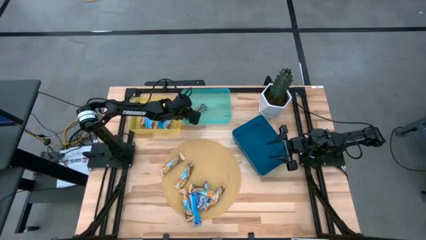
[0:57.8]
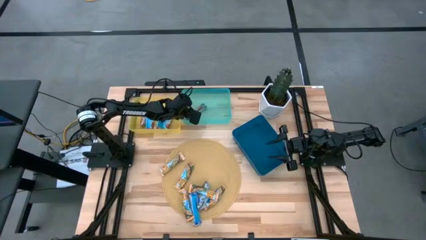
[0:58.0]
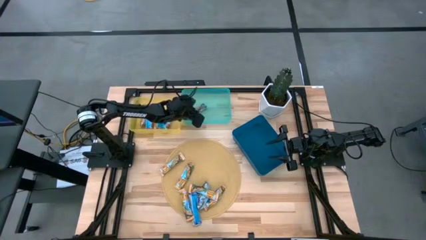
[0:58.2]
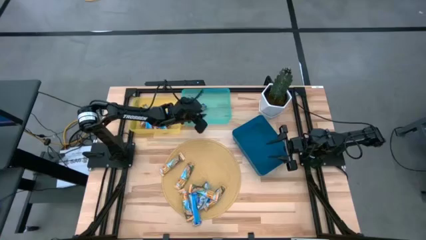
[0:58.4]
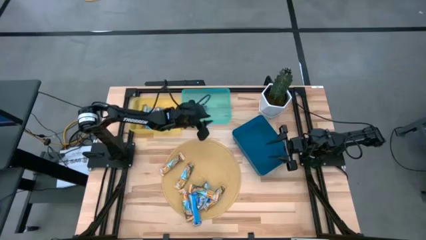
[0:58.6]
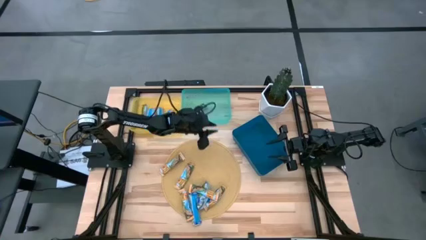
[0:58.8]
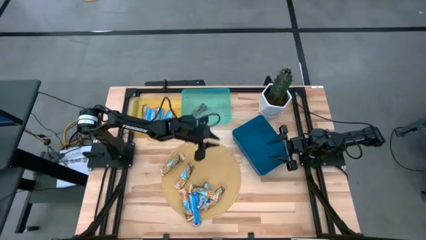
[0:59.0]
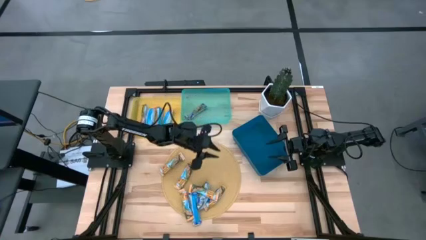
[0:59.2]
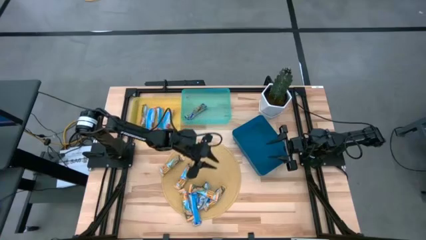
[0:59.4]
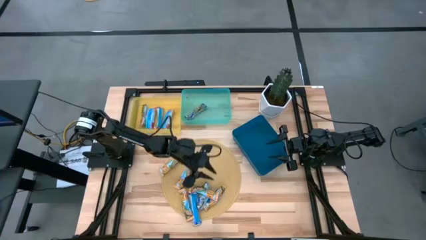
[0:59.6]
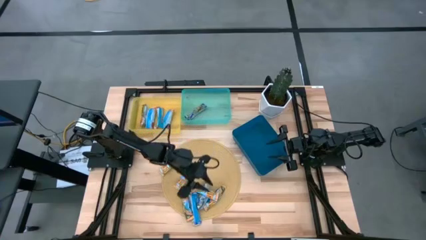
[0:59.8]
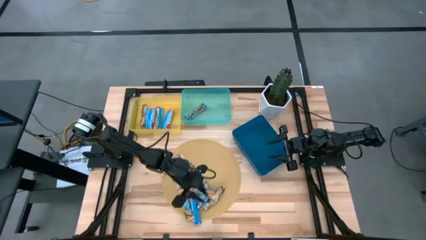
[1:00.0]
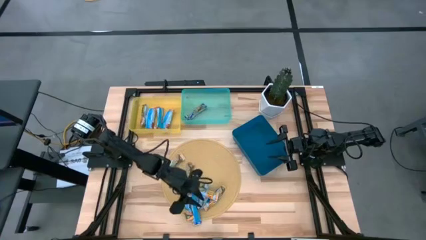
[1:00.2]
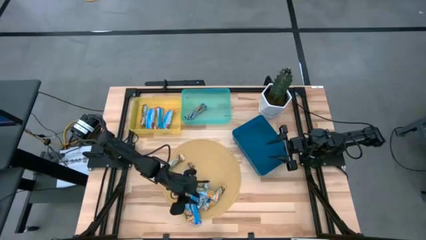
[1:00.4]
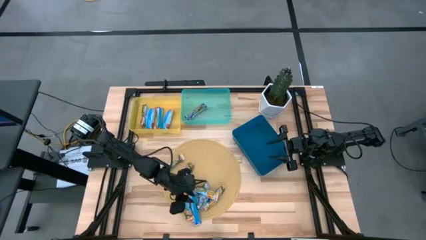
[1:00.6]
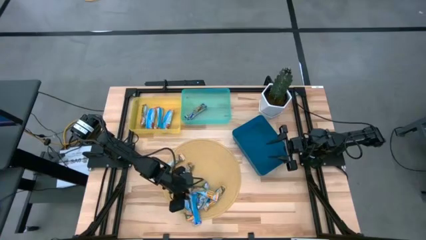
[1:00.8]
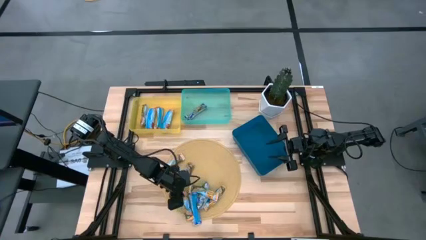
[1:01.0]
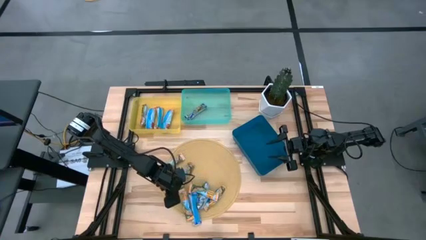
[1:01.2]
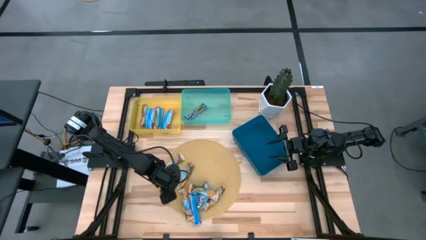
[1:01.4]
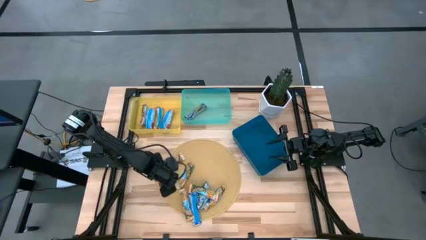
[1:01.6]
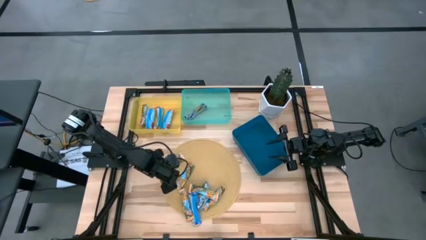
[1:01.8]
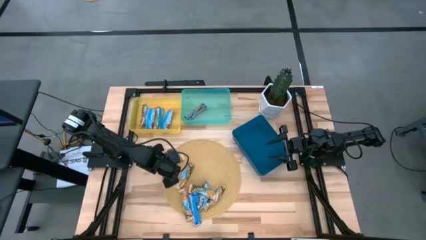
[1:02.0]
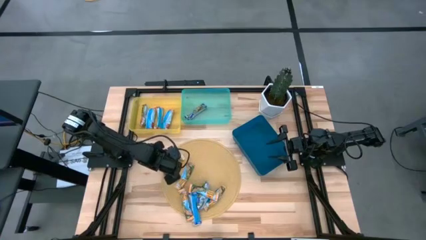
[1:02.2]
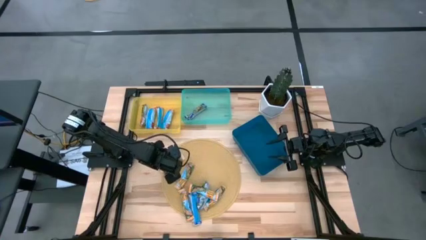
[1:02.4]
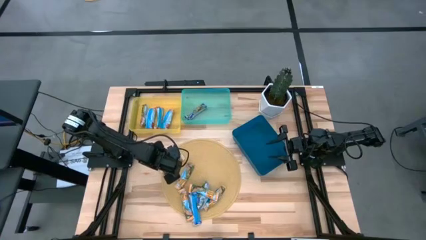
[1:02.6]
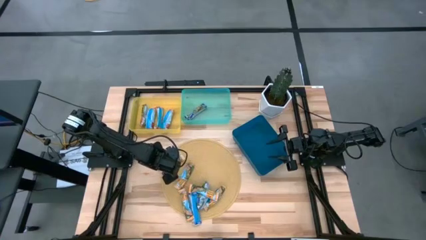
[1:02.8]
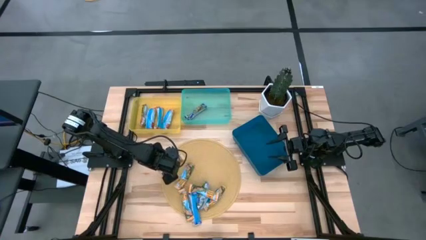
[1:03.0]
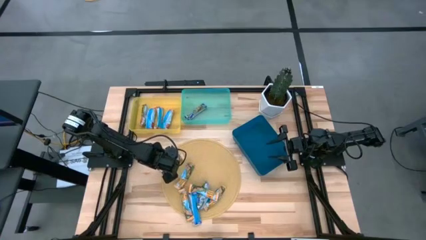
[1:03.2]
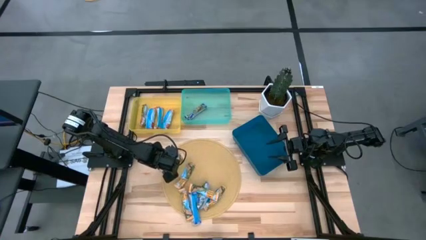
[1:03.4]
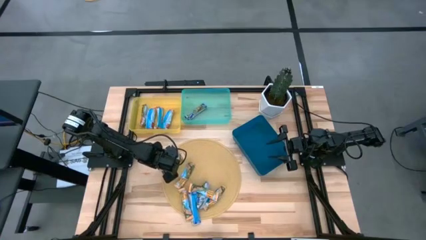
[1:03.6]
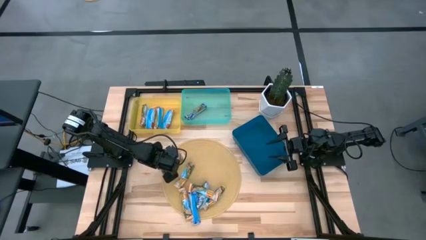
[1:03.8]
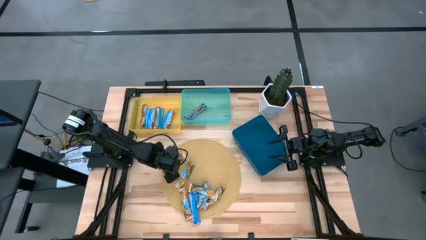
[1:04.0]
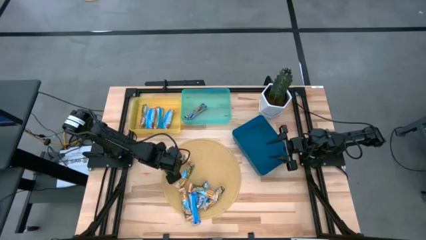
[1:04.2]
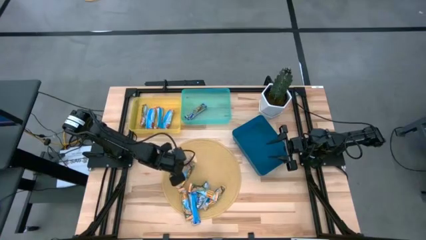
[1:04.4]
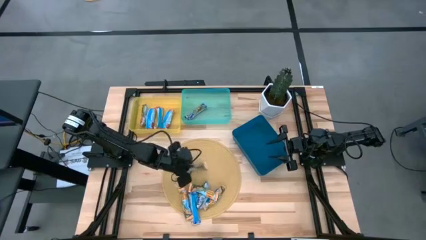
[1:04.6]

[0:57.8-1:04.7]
Task: Pick and place Granola Bars by type
Put the yellow granola bar into the blue bin

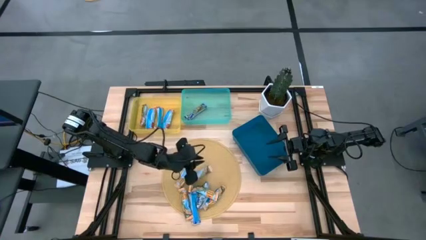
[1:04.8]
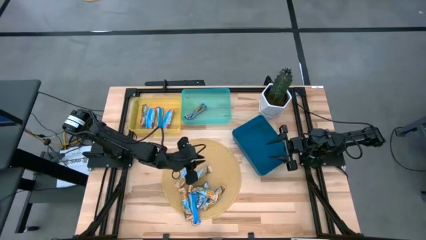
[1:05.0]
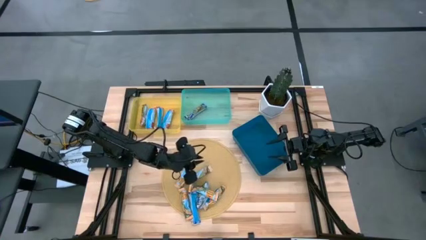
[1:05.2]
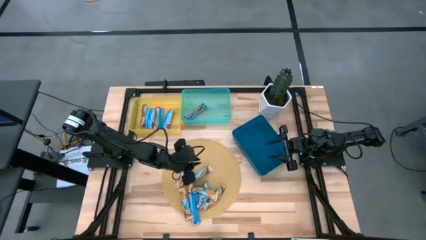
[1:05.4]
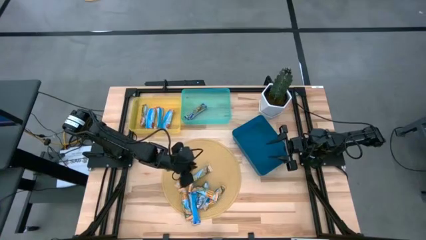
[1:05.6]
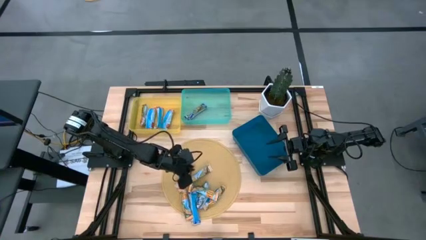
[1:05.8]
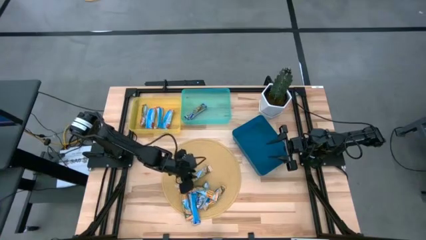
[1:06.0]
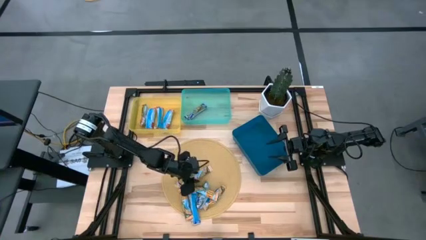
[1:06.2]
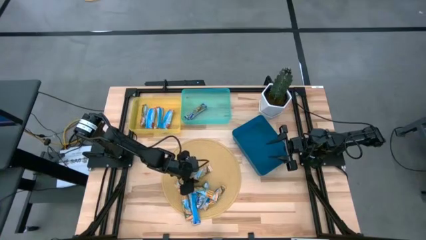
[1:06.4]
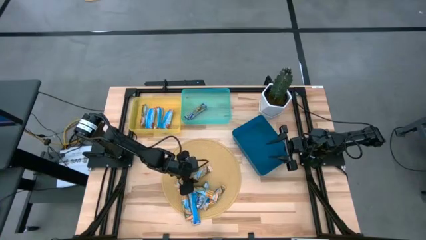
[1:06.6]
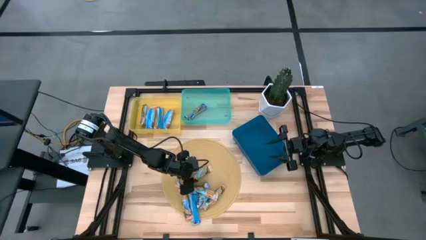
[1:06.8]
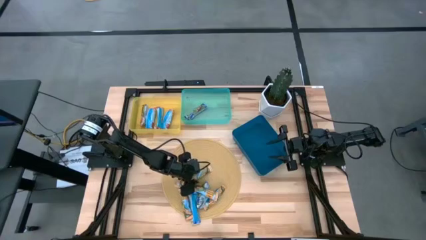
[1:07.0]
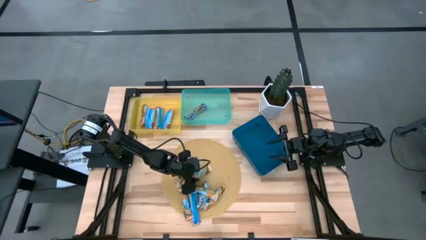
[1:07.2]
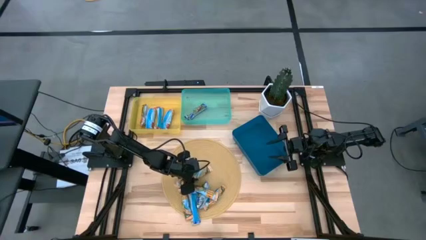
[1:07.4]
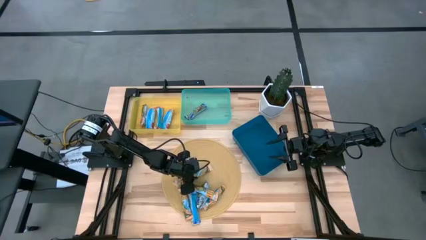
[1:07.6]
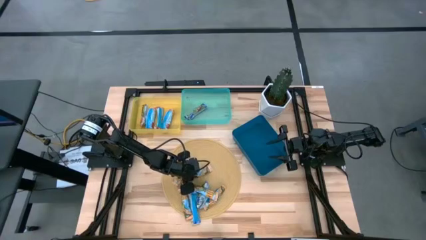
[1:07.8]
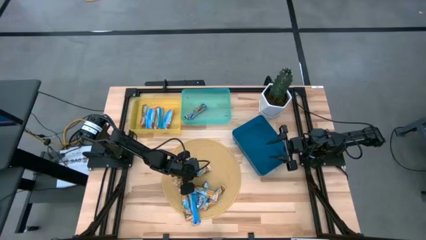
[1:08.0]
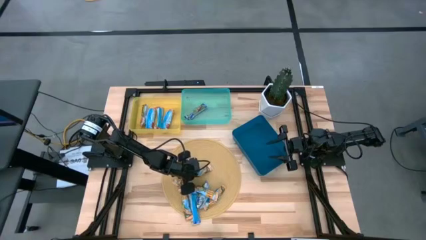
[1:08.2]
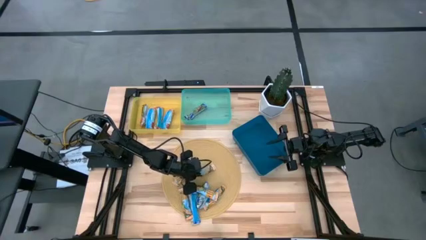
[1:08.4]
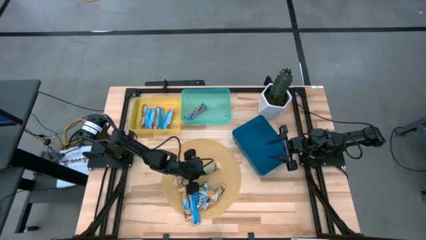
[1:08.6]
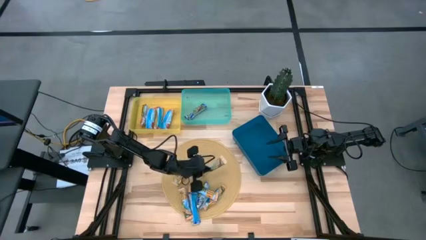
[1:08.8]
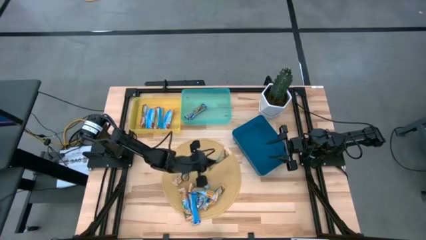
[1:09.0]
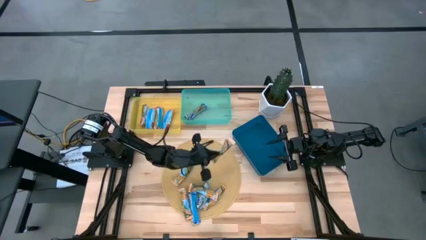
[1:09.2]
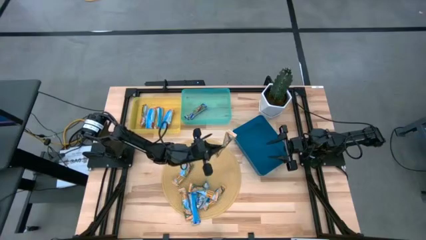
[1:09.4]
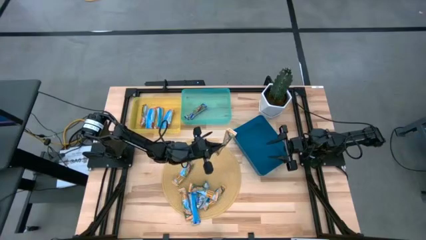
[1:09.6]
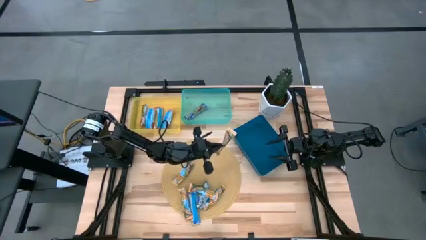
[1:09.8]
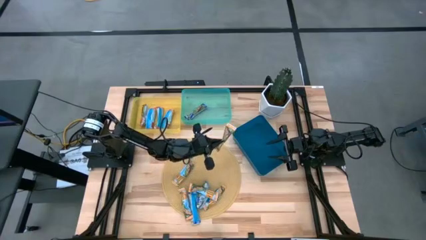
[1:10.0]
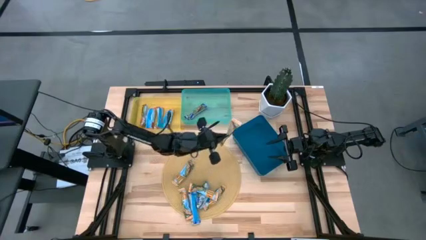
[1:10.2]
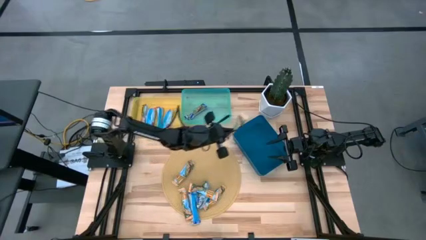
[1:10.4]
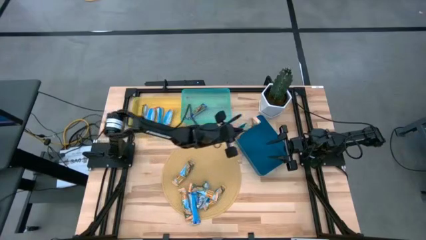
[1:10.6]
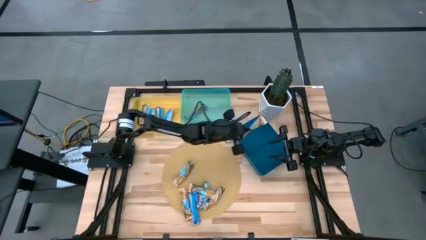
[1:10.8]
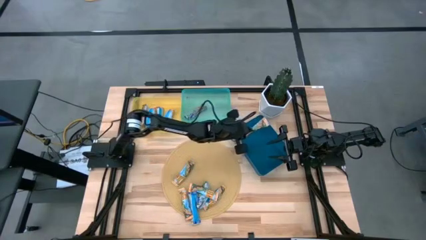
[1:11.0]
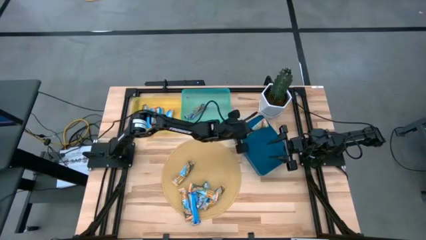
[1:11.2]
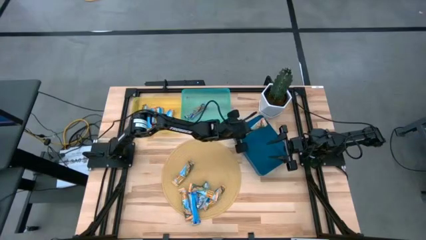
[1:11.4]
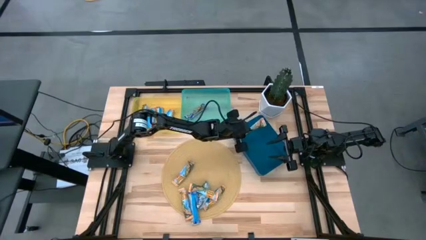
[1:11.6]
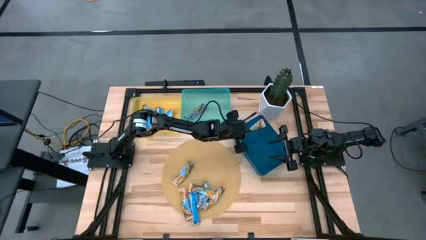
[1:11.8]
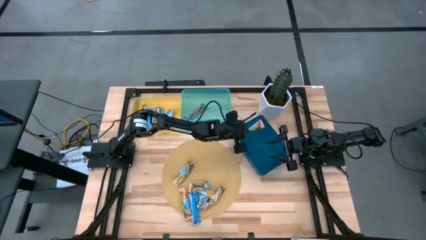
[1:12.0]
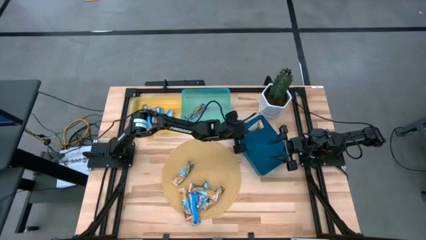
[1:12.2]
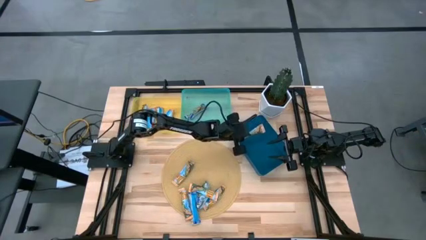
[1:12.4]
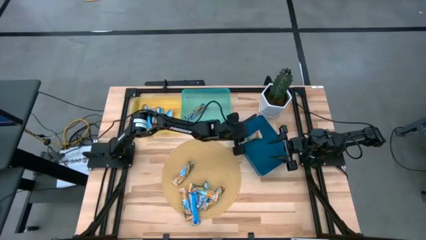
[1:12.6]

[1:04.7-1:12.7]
Put the yellow granola bar into the blue bin
